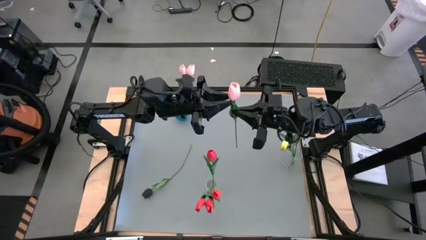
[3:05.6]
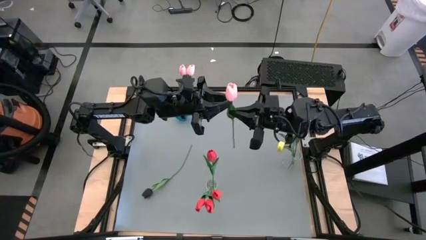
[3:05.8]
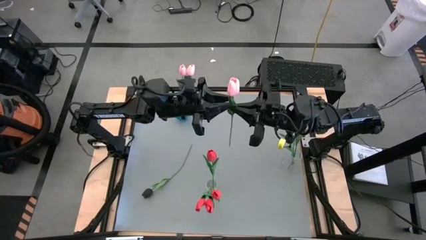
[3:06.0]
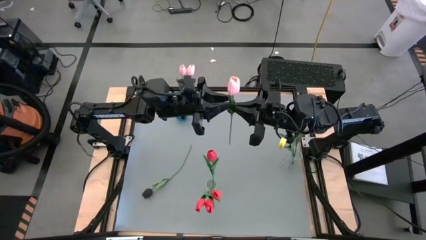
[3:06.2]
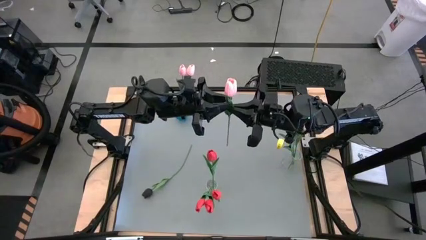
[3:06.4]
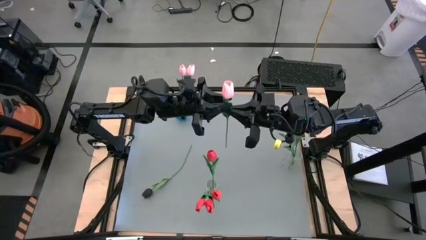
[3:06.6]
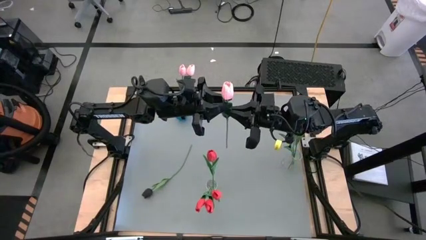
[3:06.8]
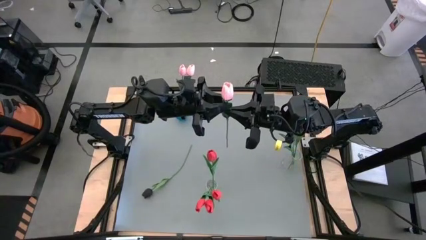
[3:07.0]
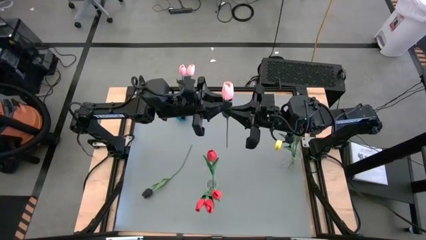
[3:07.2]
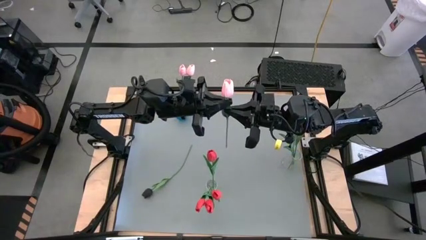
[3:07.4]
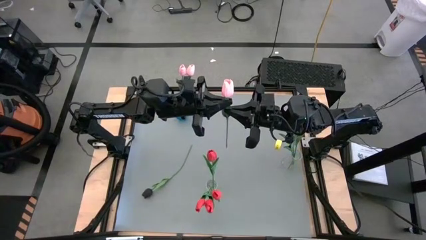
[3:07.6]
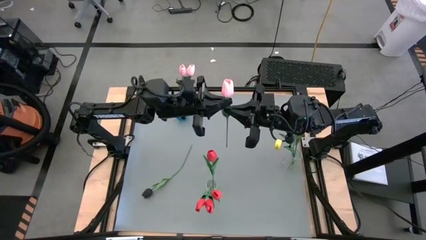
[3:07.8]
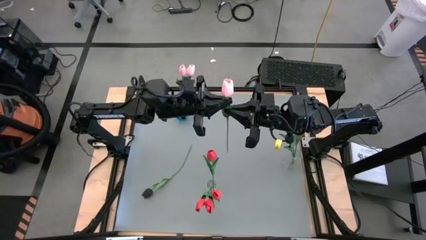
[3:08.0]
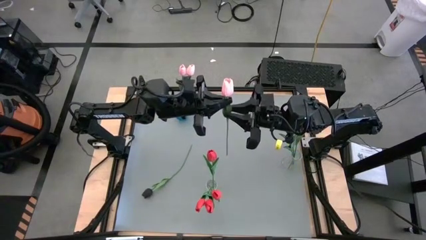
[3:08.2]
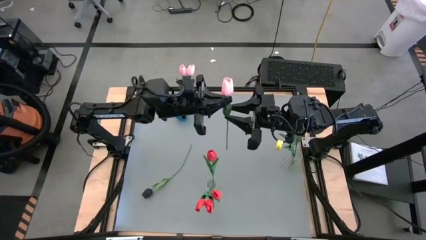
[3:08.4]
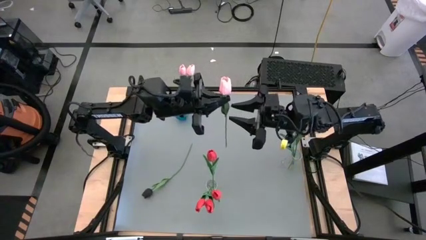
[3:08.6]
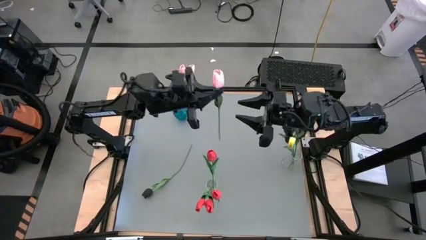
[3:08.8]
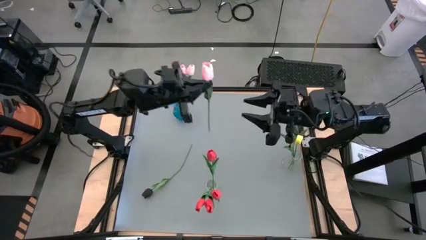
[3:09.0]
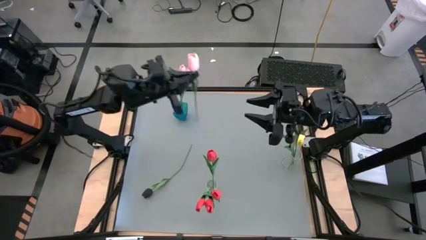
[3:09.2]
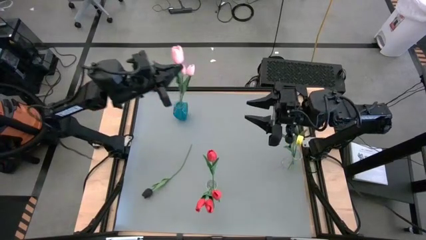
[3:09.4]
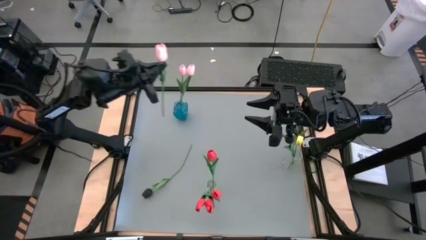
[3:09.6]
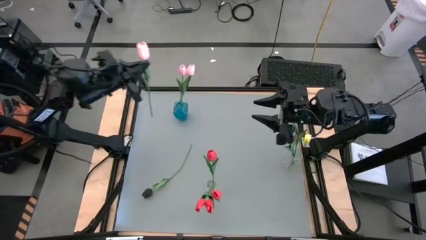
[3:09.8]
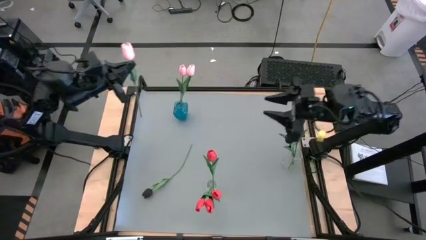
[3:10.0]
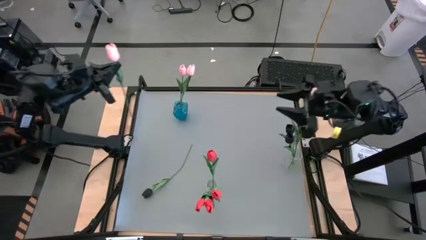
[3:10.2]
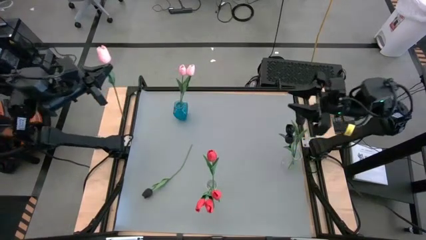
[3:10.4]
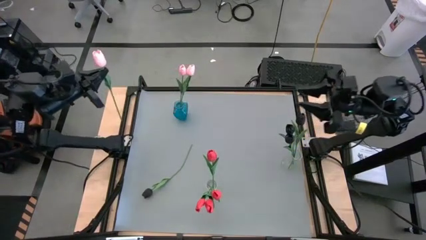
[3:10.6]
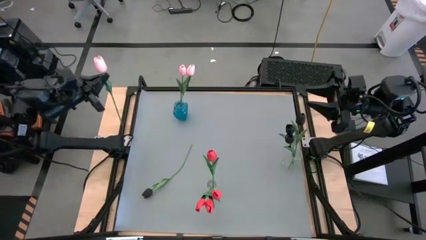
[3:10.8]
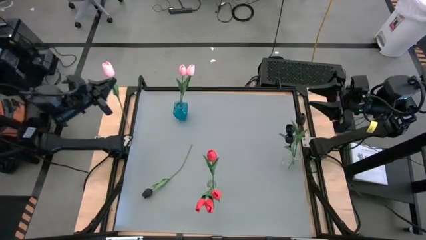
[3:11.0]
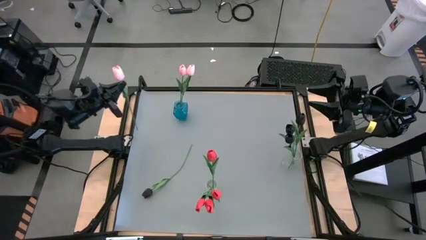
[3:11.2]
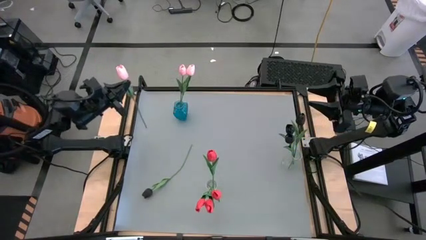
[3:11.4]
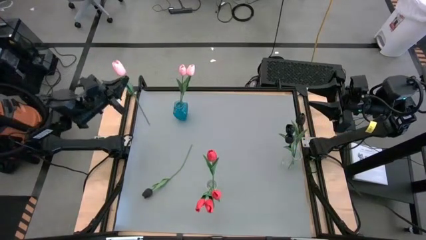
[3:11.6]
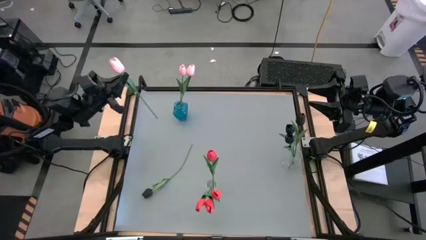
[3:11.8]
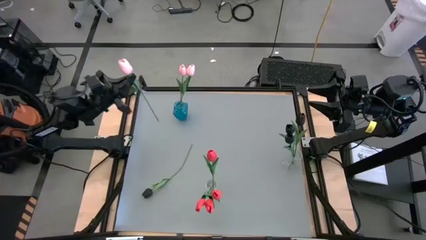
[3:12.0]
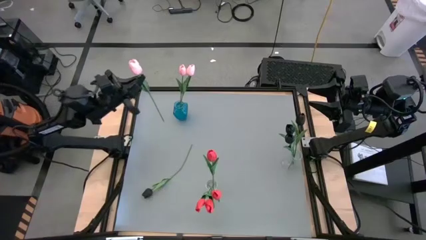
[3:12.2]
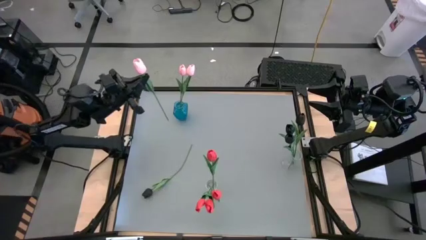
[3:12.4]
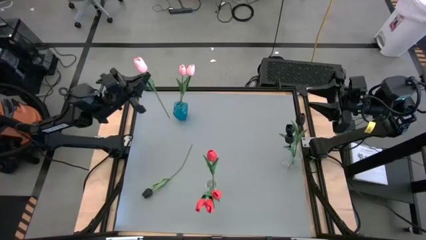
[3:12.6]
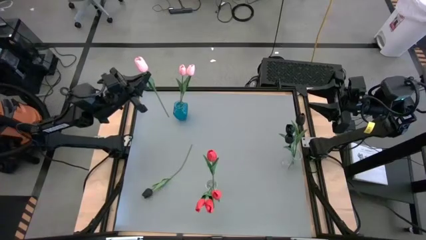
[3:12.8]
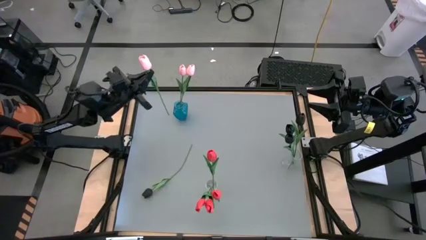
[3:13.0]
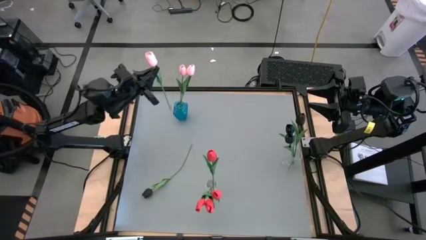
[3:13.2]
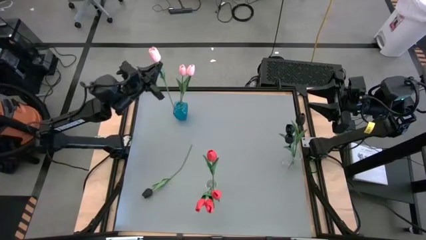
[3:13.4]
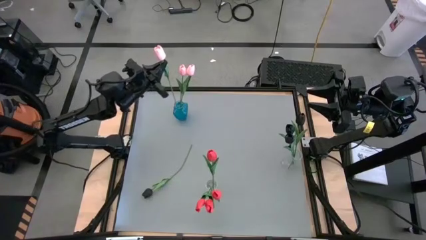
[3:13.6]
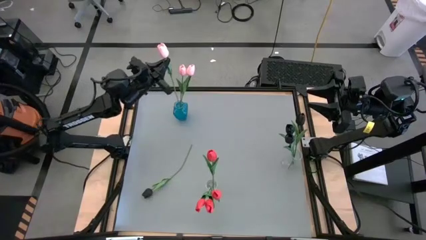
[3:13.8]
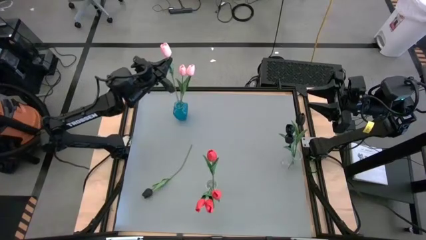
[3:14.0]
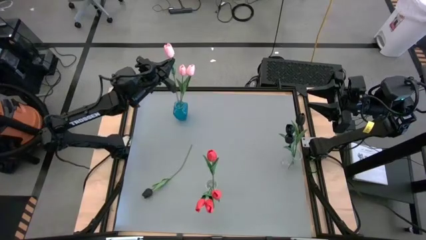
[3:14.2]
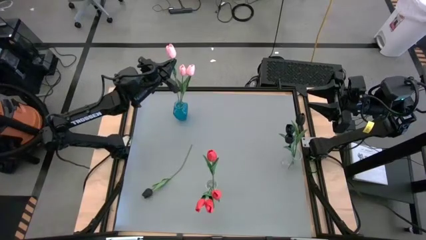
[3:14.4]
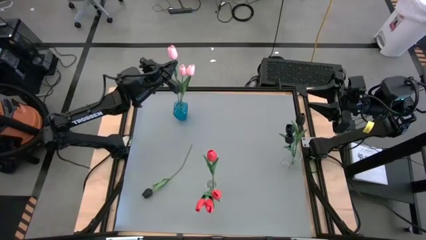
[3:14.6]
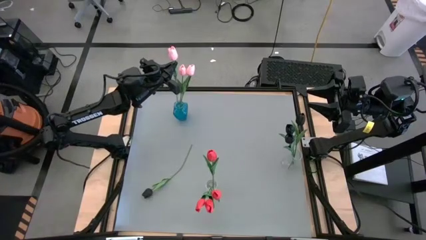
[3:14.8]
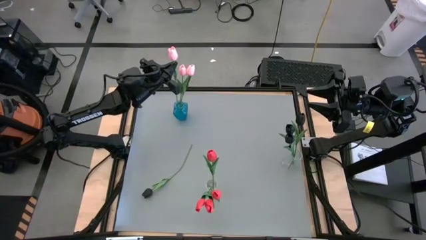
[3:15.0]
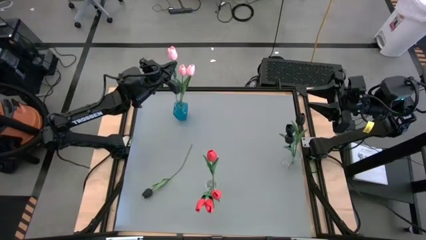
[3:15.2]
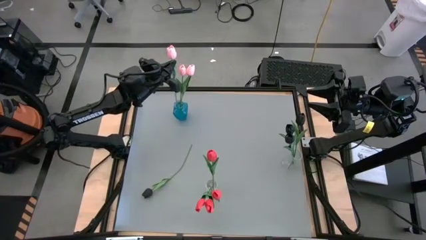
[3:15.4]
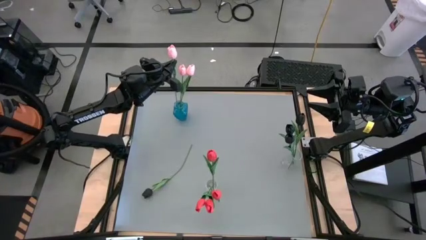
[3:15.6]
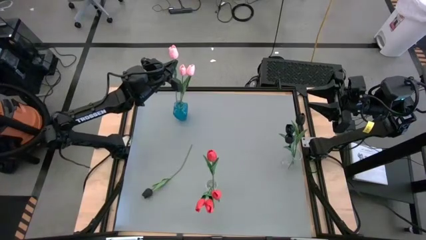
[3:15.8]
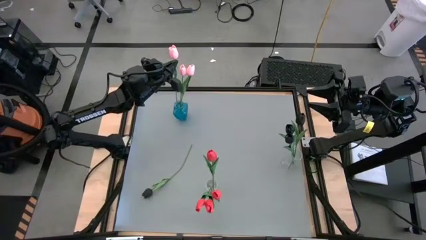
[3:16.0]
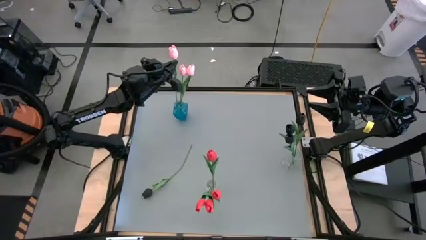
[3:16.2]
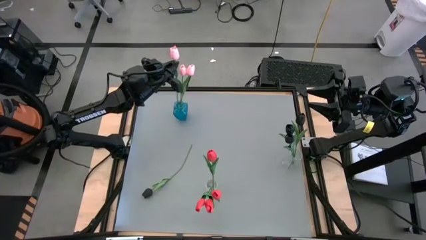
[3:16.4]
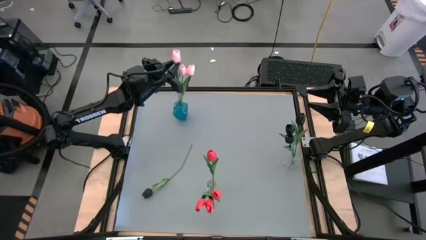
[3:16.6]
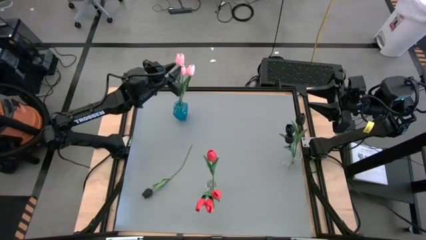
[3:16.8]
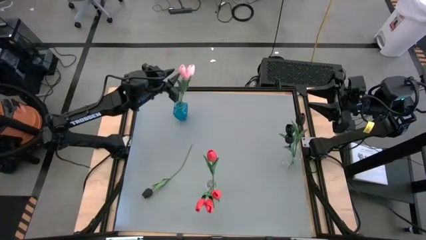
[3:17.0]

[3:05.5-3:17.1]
Task: Sort flowers into vase by color
Put the pink flower into the blue vase
